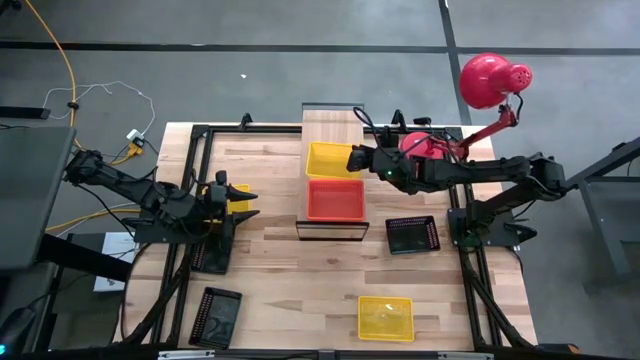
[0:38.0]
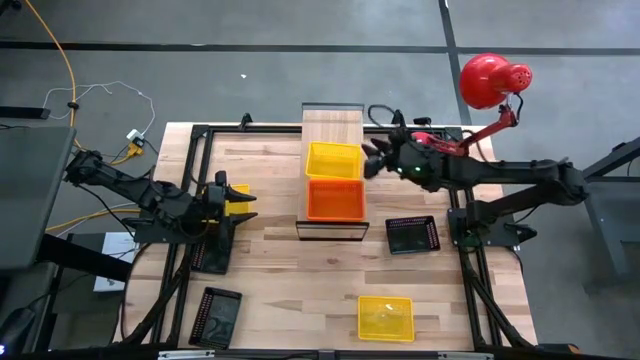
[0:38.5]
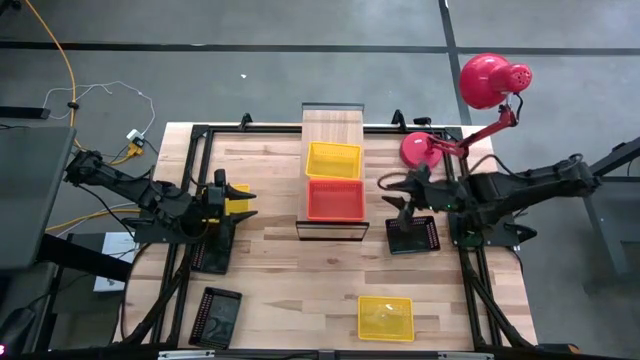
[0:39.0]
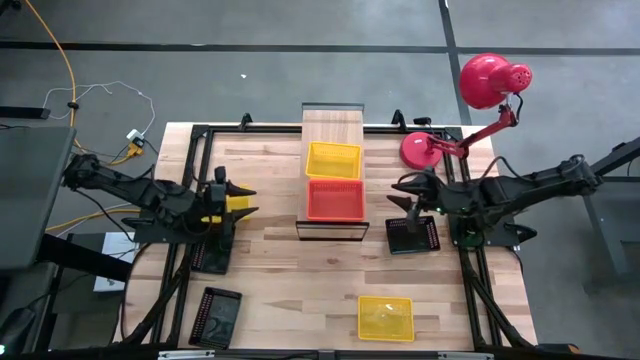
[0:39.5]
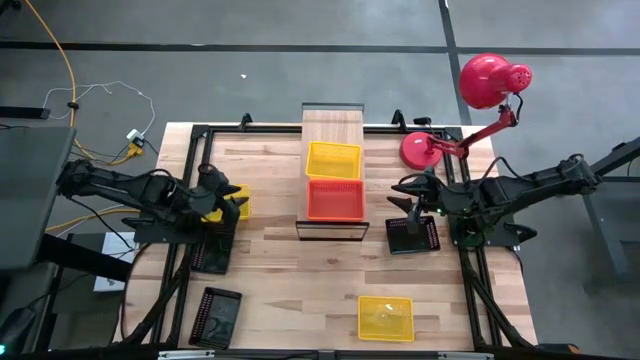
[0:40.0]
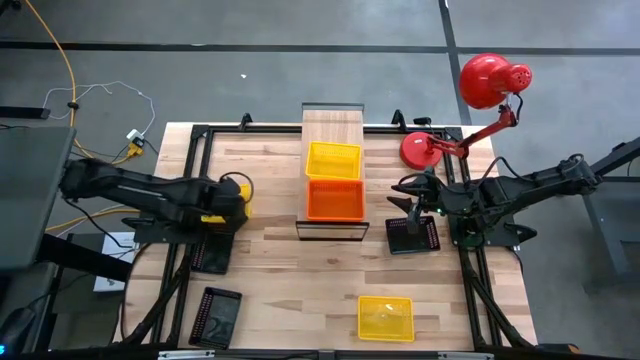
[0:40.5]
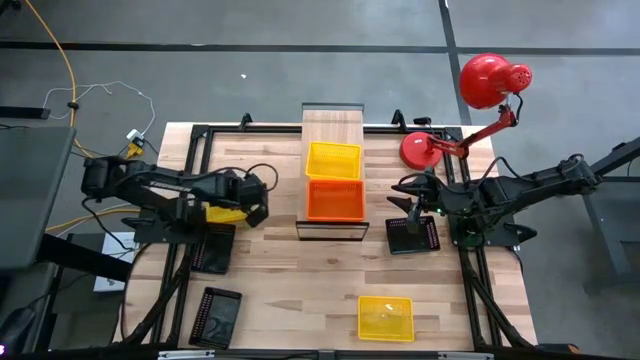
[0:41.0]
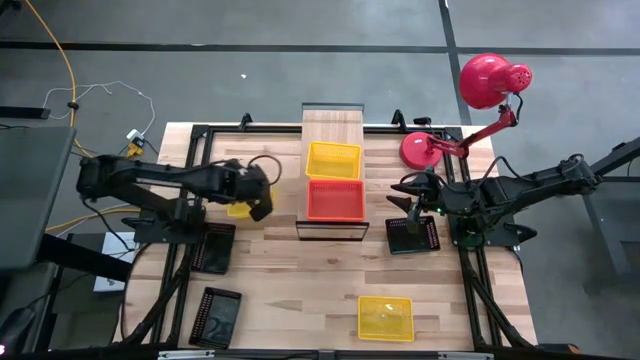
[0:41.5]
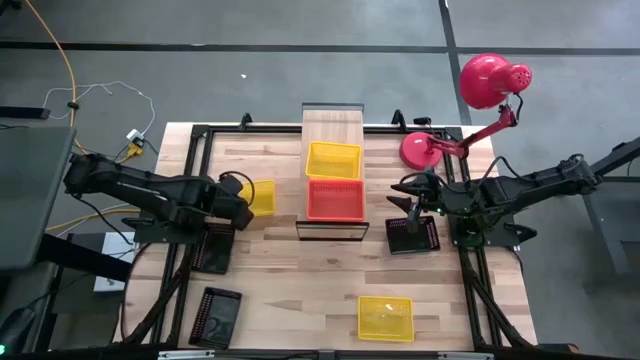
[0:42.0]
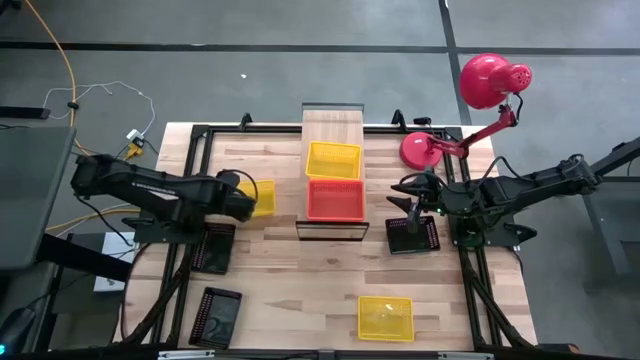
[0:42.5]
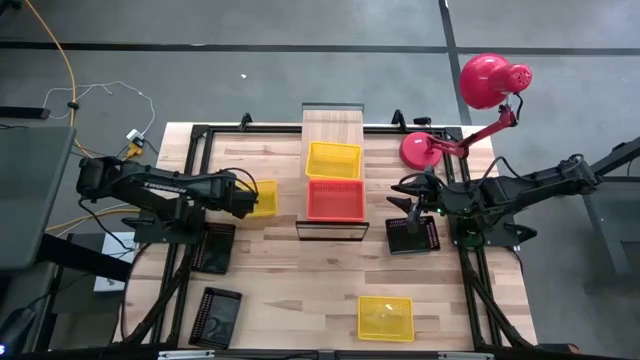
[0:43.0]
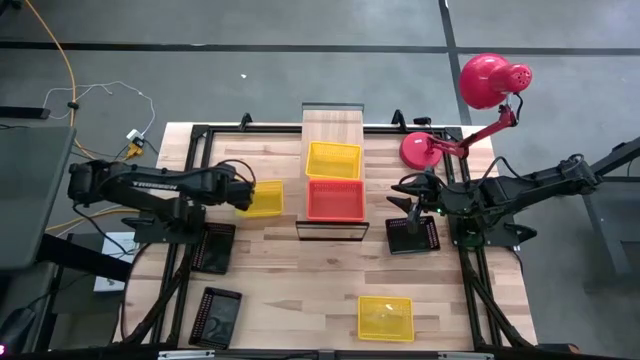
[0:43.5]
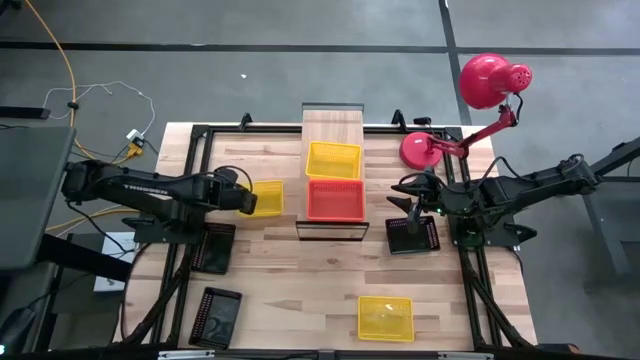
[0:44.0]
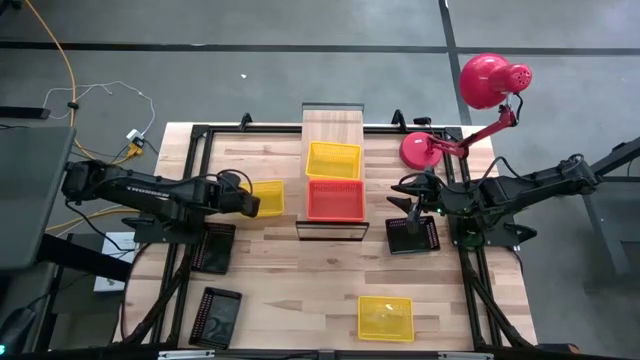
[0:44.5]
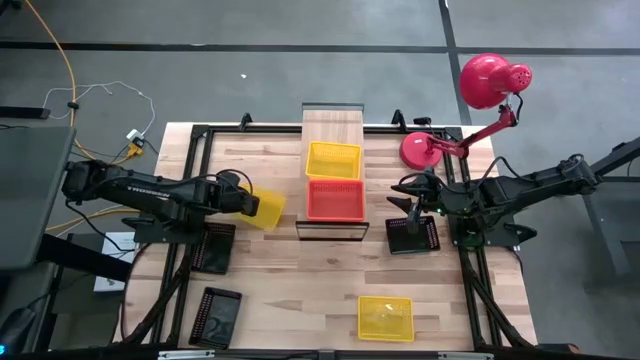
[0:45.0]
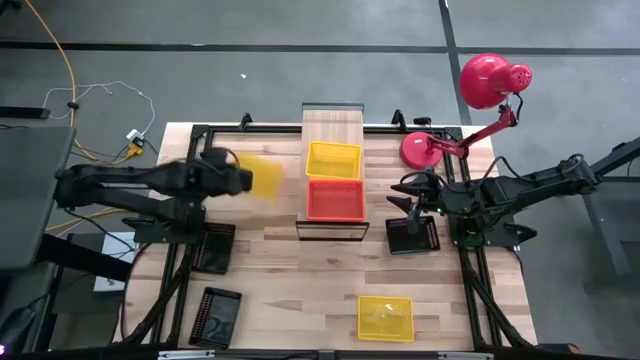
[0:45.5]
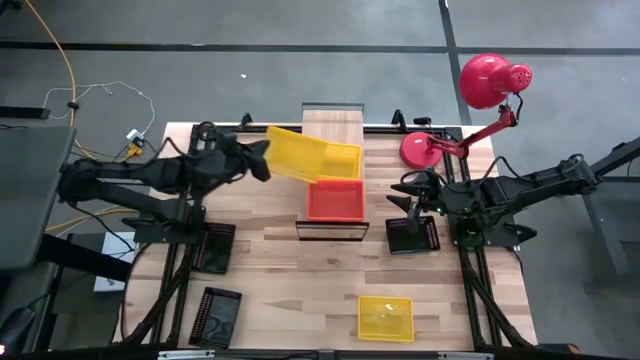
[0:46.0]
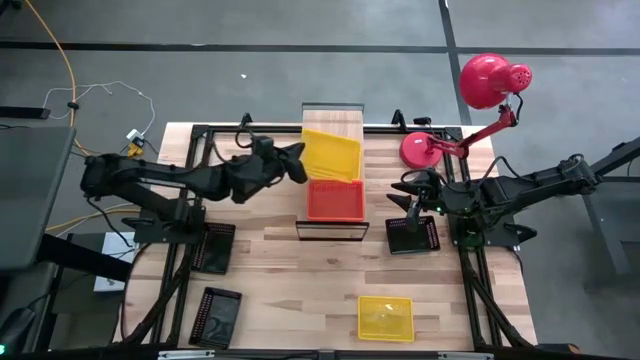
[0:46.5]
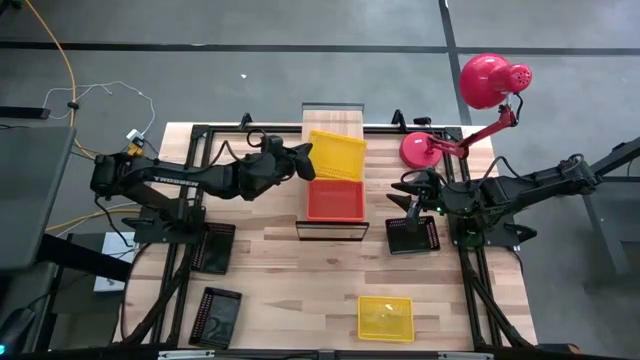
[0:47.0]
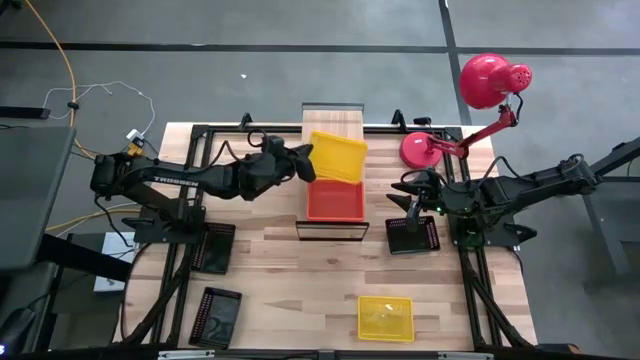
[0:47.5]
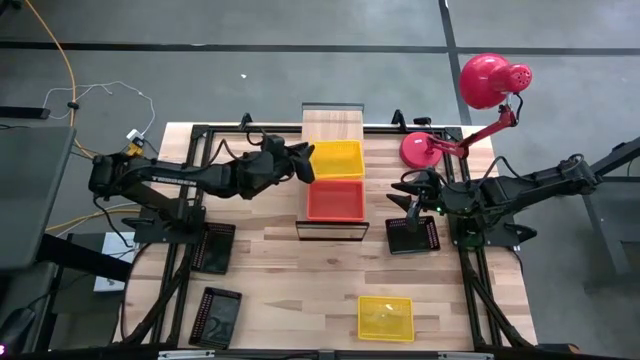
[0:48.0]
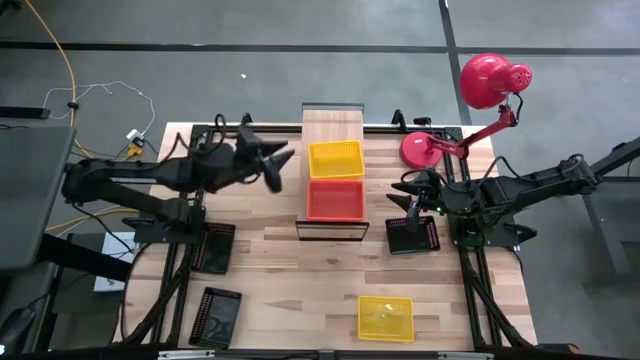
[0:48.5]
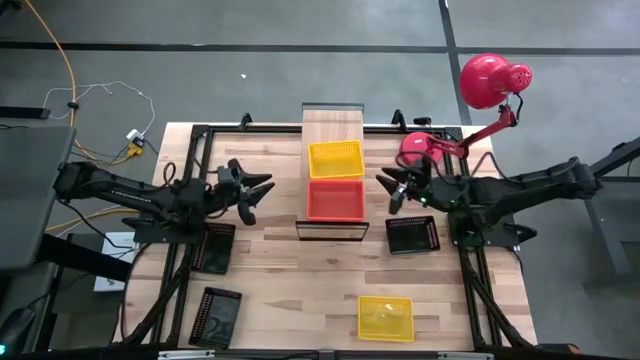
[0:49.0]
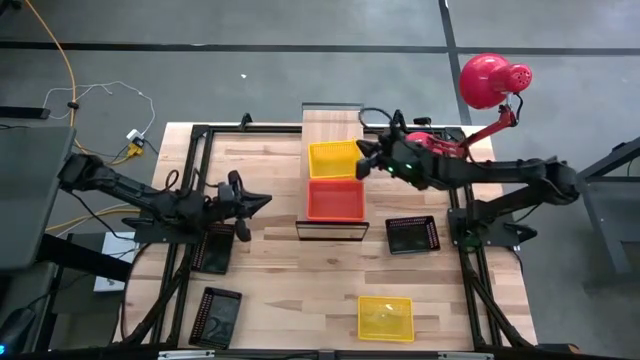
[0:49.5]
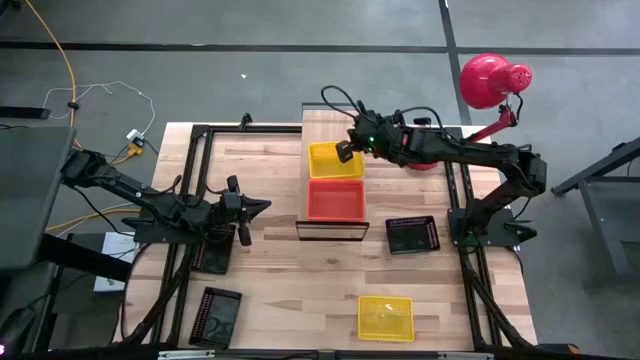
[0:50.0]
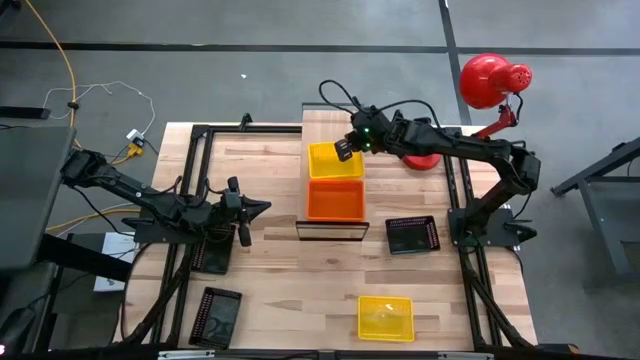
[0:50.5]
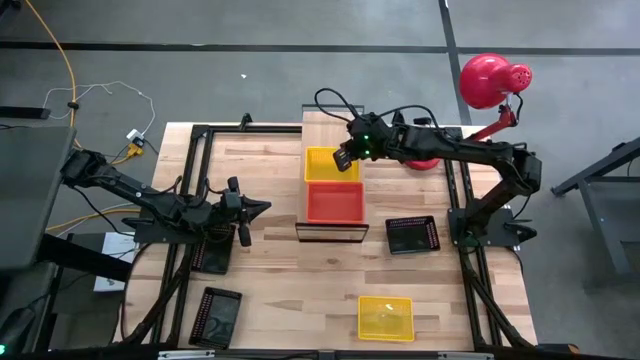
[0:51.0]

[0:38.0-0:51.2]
Task: Stack baskets on shelf by color
Stack the top yellow bin on the yellow bin on the shelf

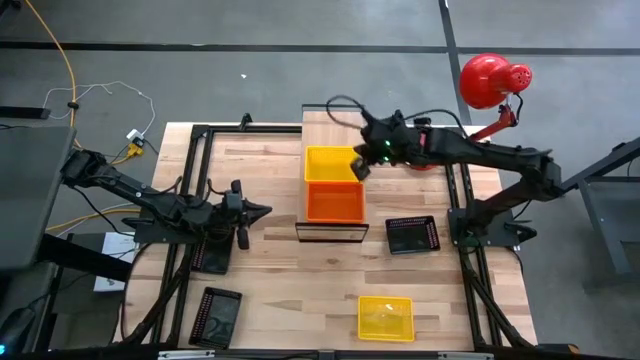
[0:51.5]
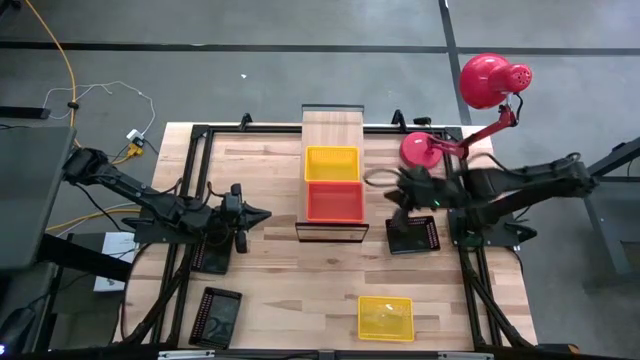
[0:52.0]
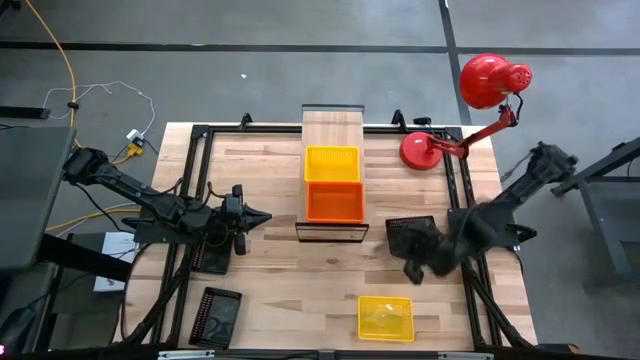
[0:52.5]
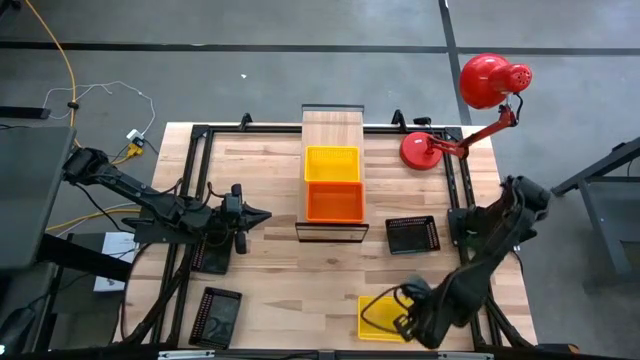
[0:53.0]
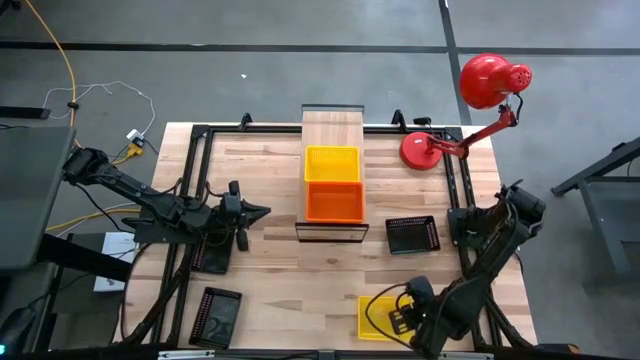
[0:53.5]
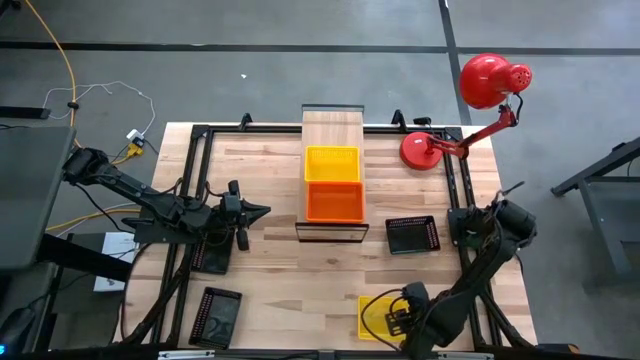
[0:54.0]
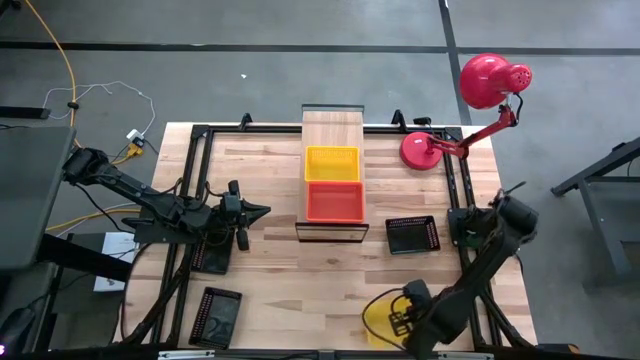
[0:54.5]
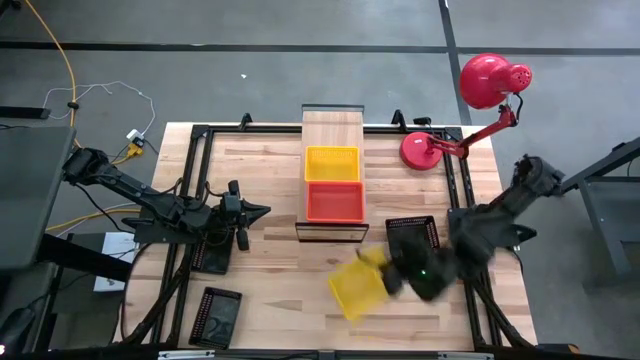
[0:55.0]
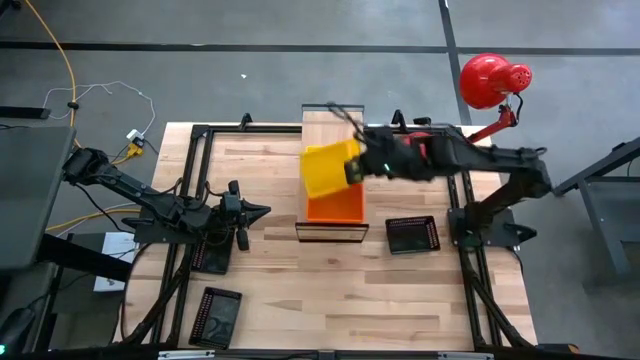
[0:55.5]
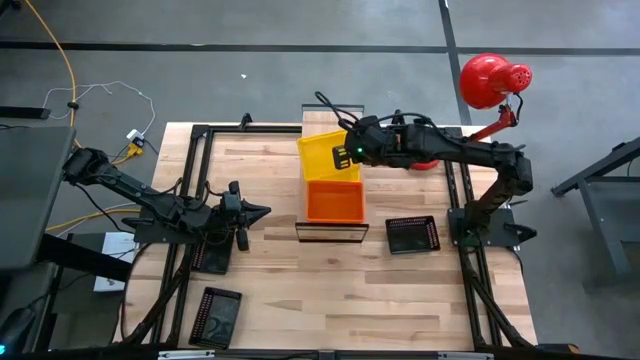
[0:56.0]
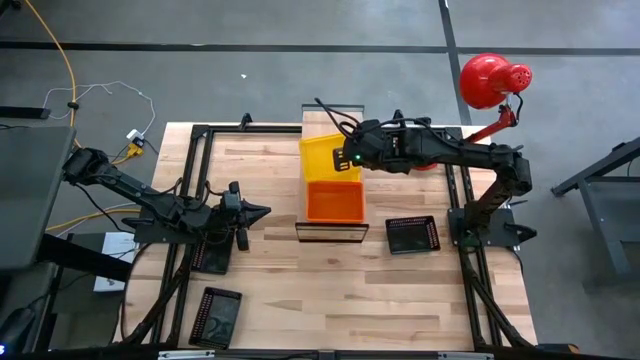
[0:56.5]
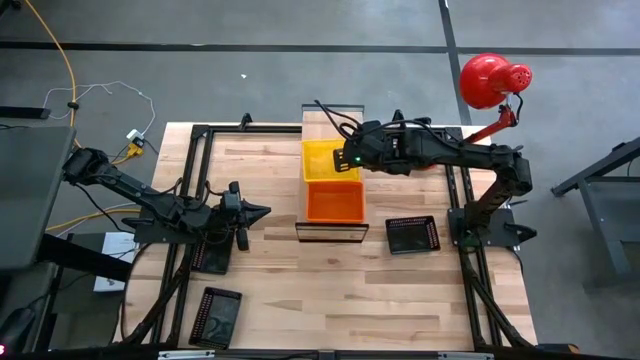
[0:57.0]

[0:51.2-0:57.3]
Stack the yellow bin on the yellow bins on the shelf

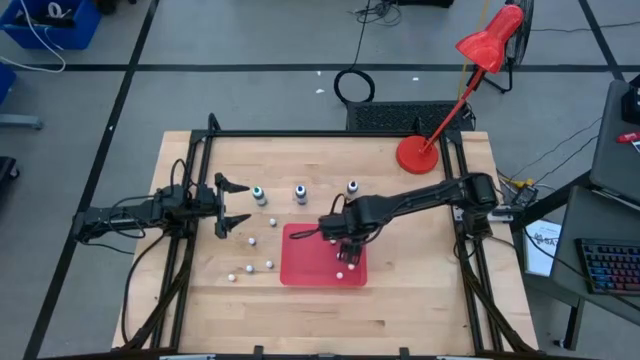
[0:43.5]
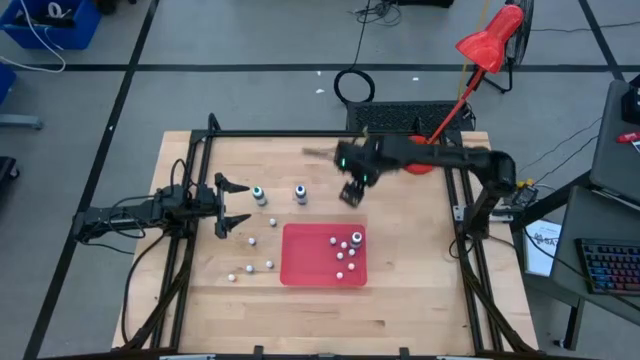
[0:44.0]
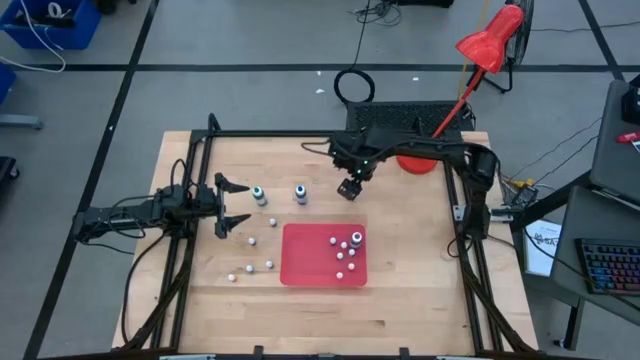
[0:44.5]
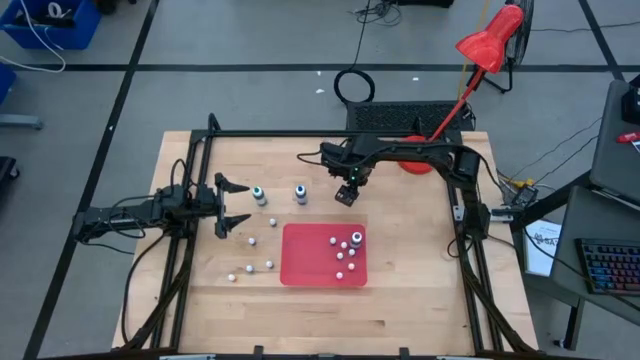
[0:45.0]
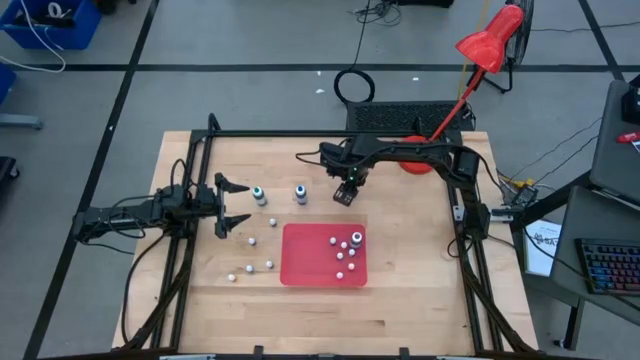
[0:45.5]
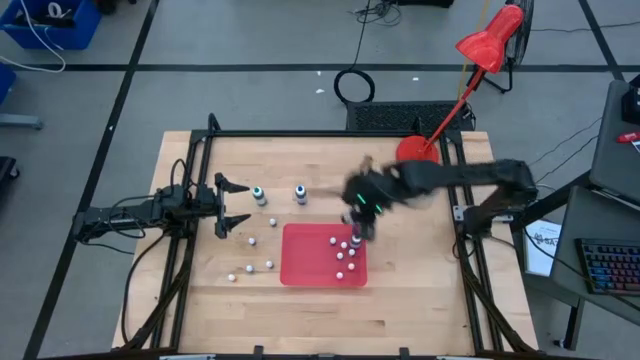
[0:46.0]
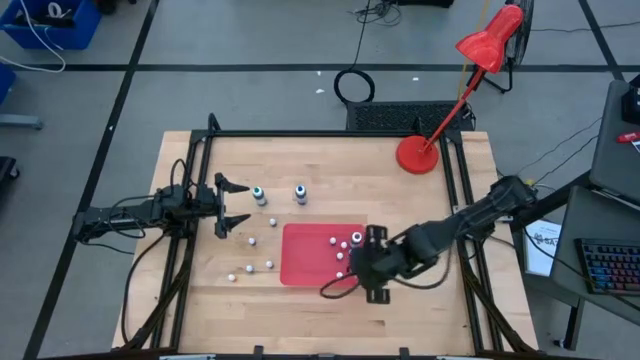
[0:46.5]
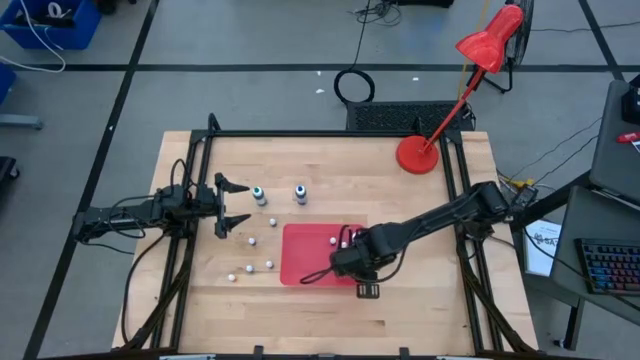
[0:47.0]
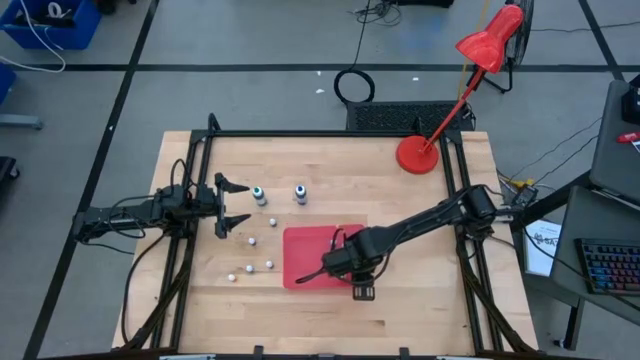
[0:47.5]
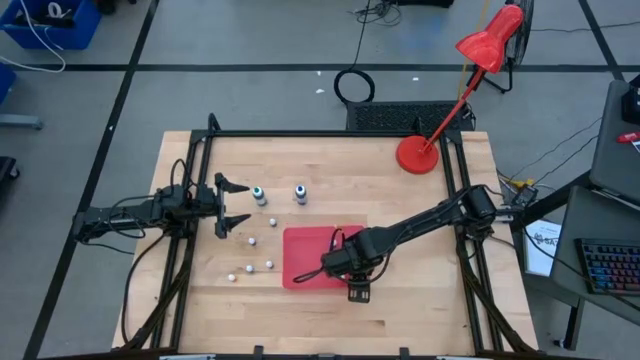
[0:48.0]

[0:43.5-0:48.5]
Task: Pick & Place food coloring
Put the large black food coloring bottle into the pink bin
